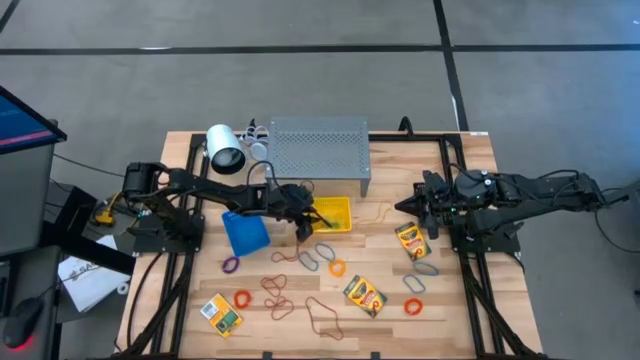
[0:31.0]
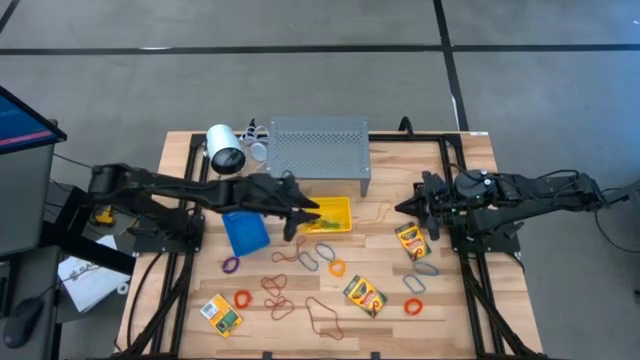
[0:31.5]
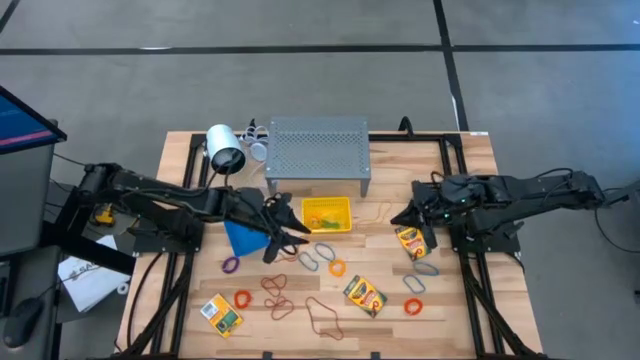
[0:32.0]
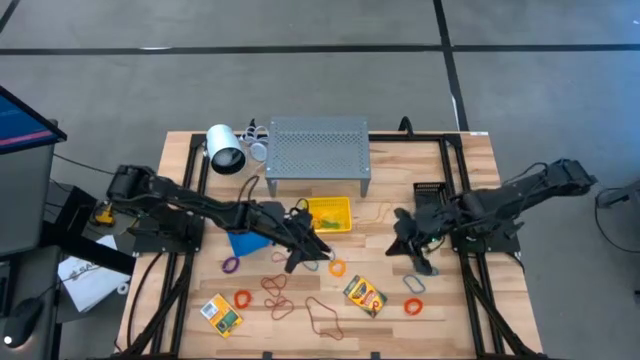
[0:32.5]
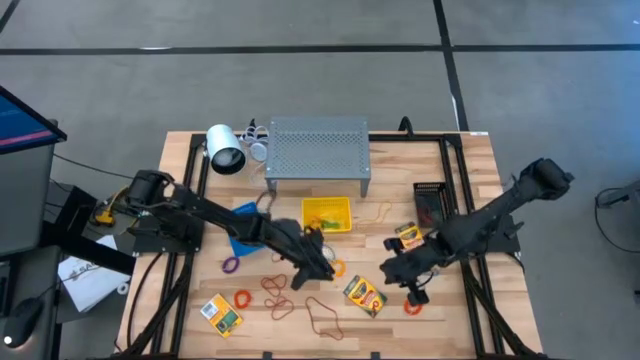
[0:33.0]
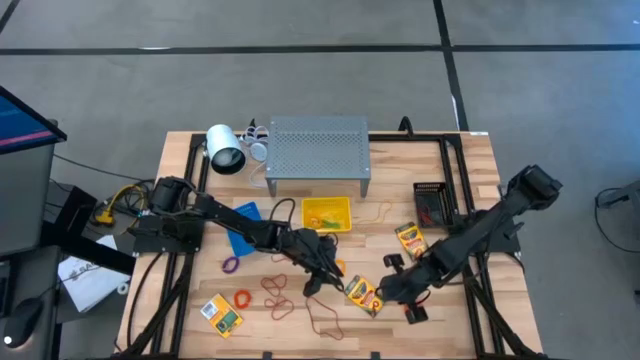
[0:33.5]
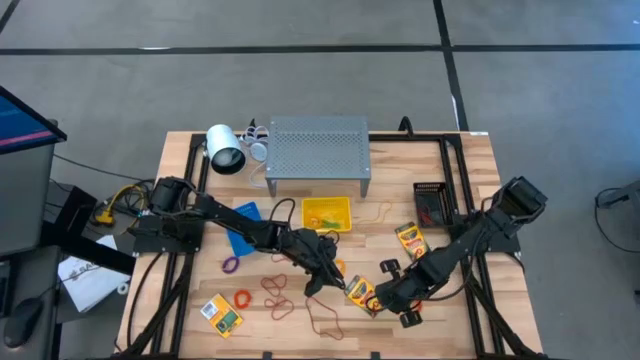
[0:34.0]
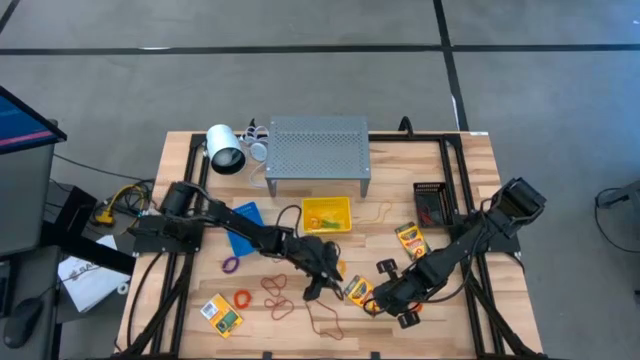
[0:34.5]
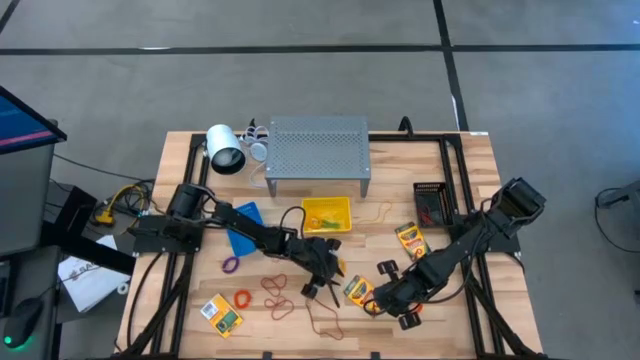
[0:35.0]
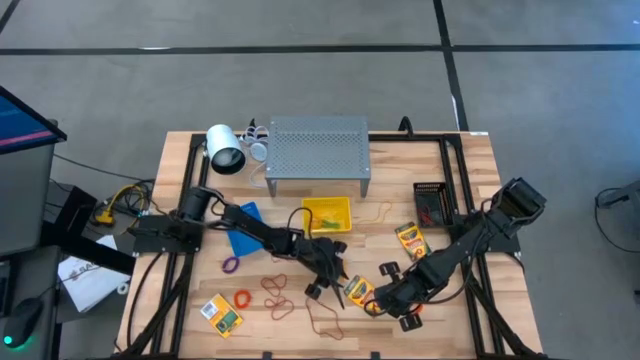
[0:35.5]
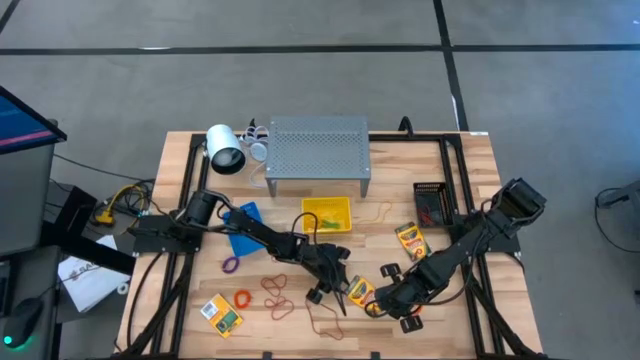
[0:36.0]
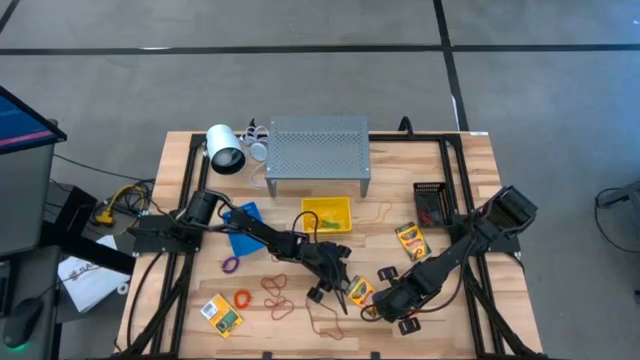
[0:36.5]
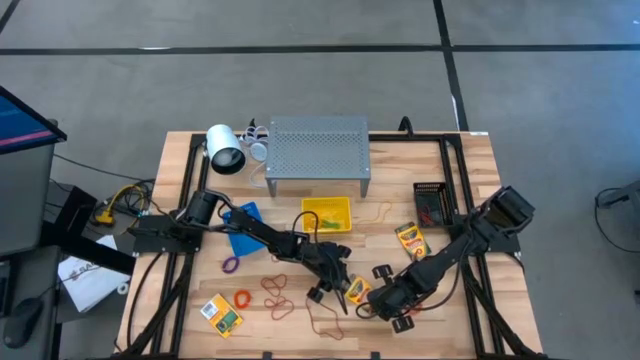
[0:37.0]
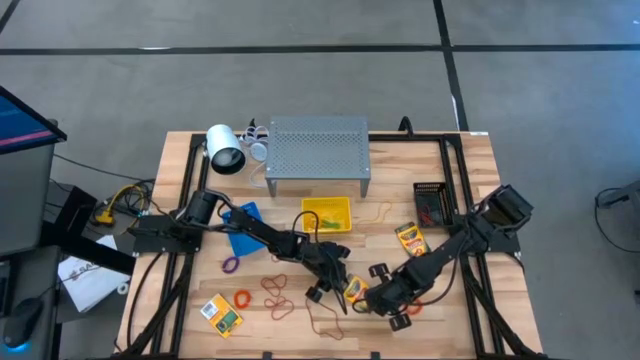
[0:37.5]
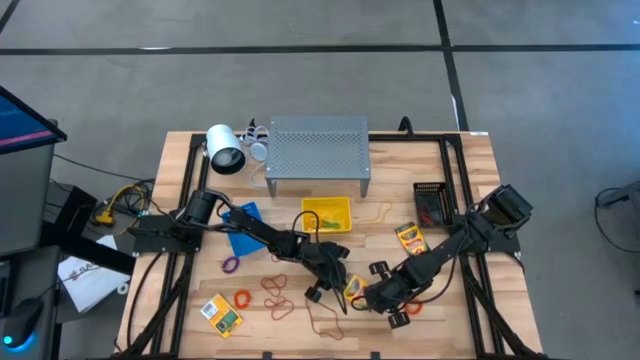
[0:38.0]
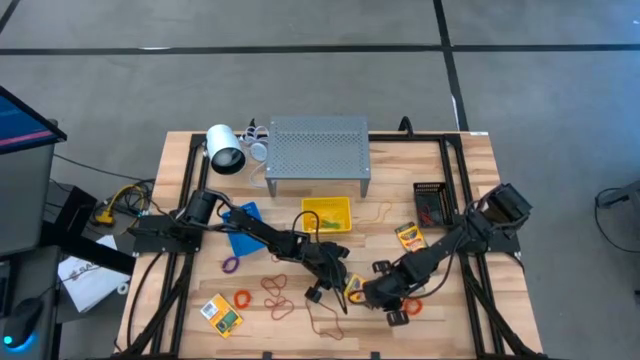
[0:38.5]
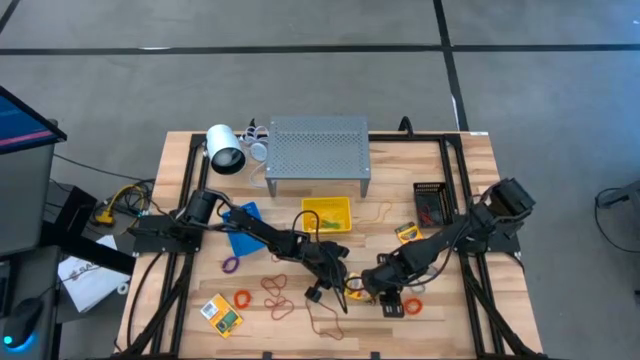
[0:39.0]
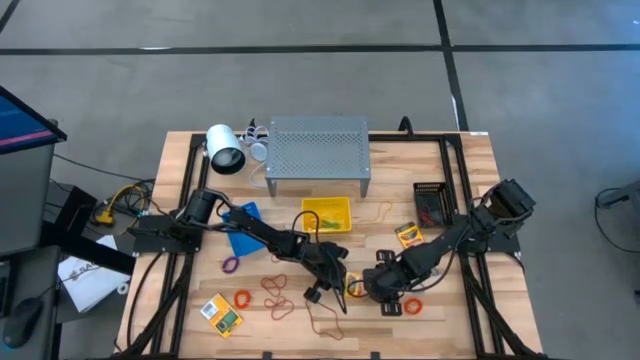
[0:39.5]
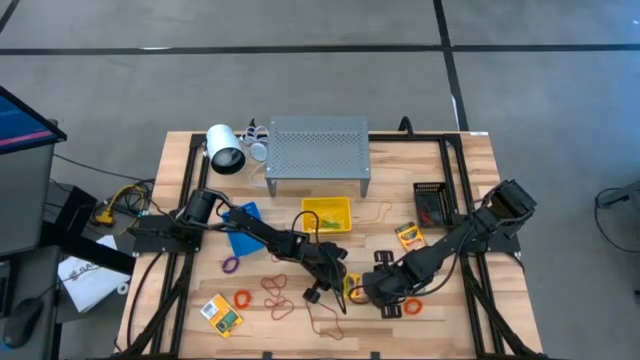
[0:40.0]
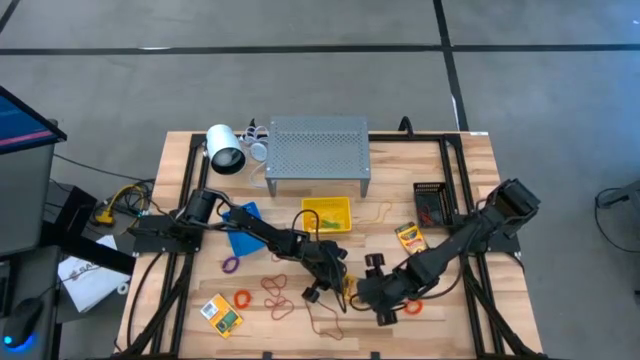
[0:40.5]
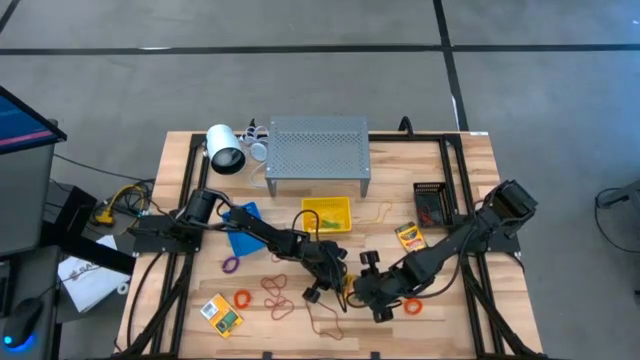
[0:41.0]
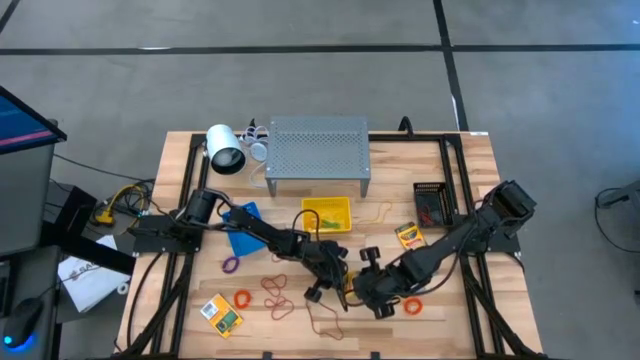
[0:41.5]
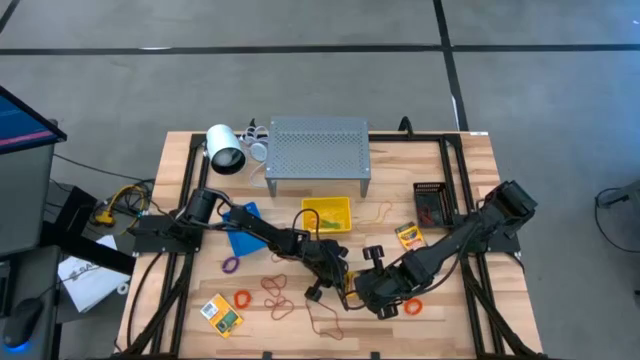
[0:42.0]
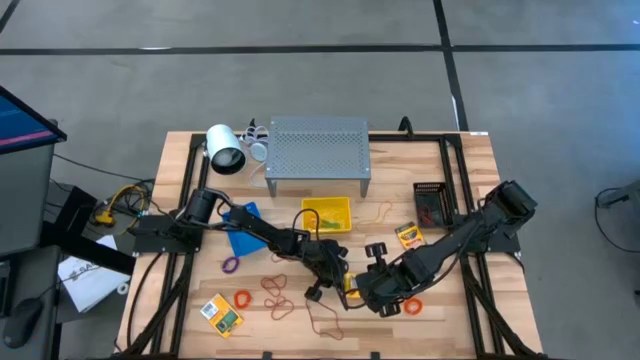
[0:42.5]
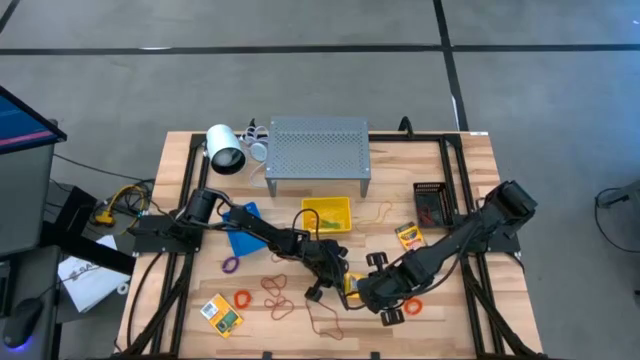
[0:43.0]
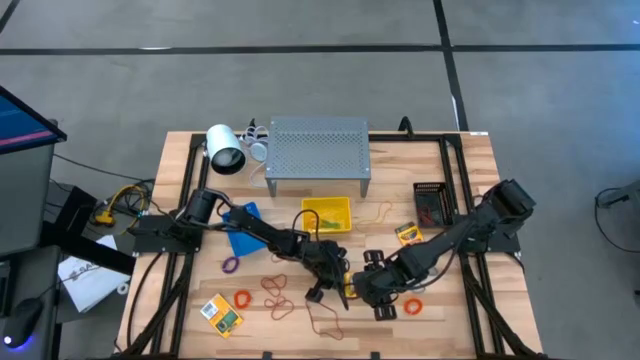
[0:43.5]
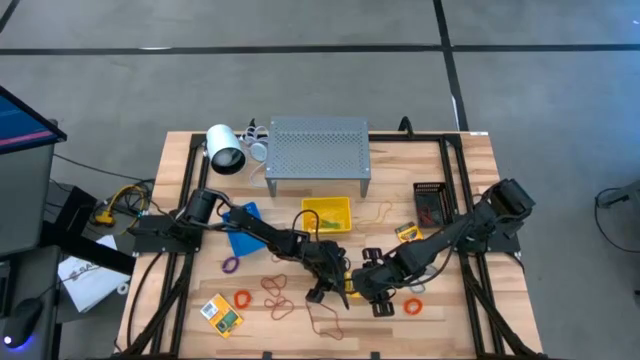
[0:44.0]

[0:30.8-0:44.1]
Task: Pick & Place Office Desk Supplies
Put the crayon box into the blue bin

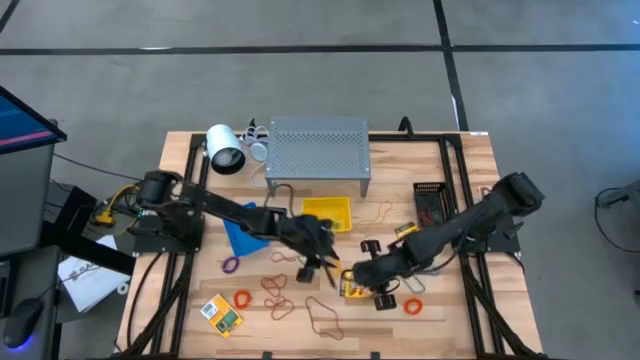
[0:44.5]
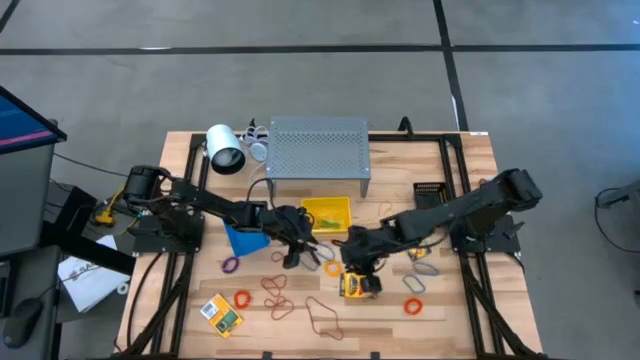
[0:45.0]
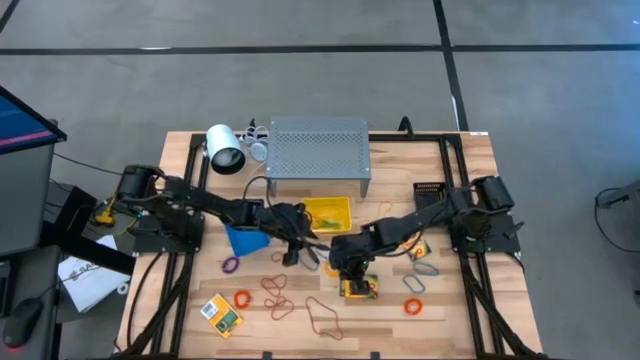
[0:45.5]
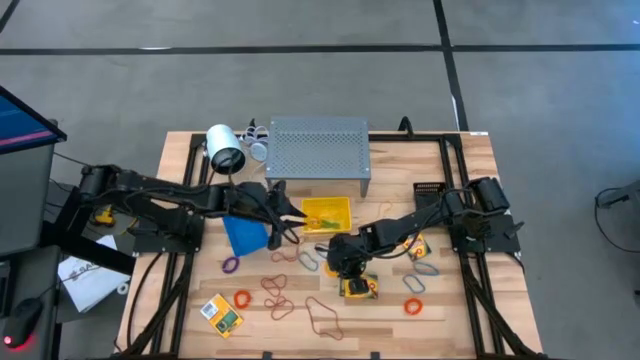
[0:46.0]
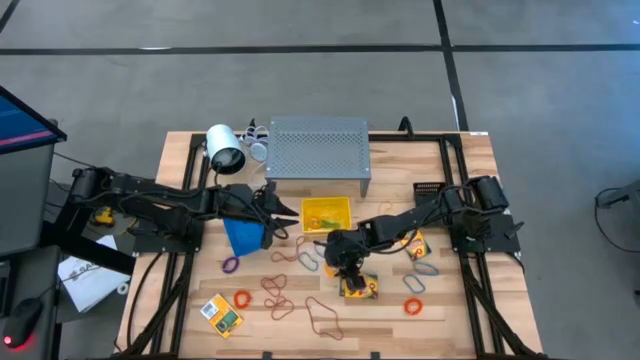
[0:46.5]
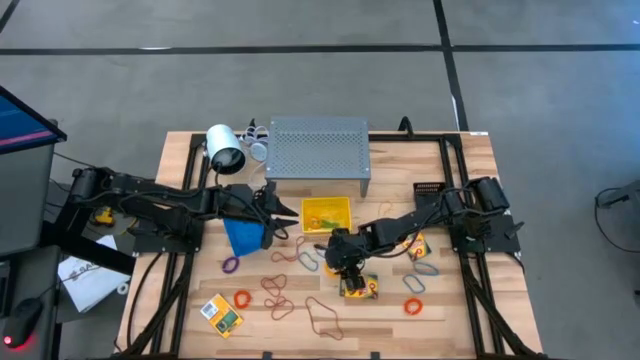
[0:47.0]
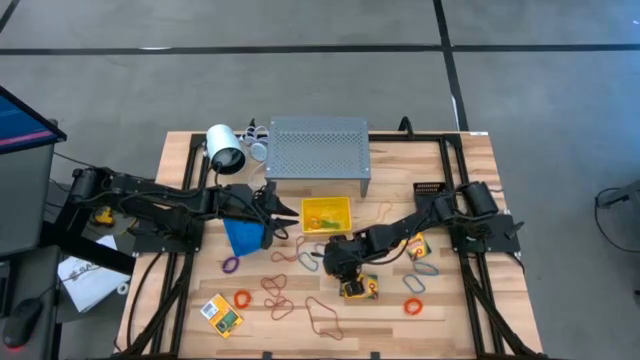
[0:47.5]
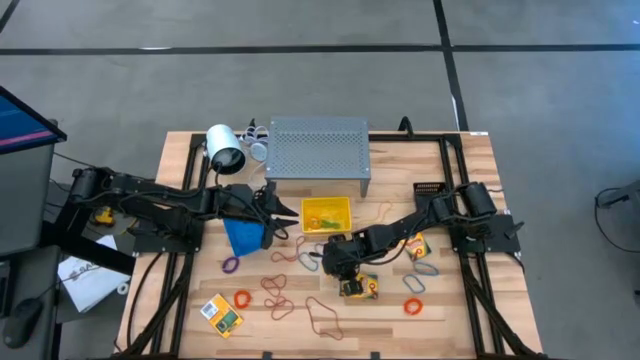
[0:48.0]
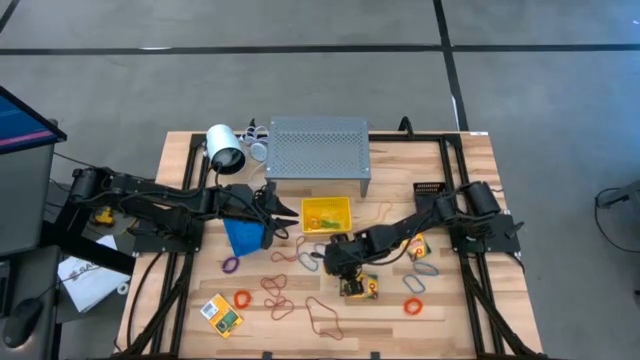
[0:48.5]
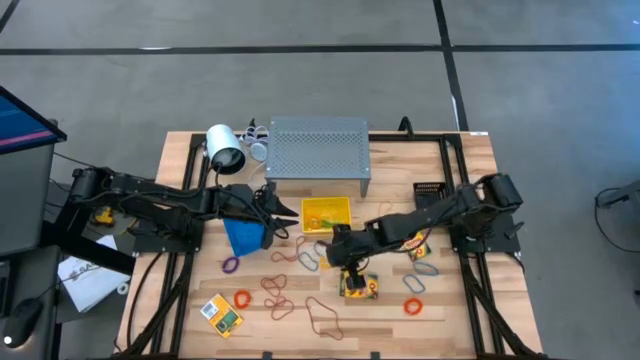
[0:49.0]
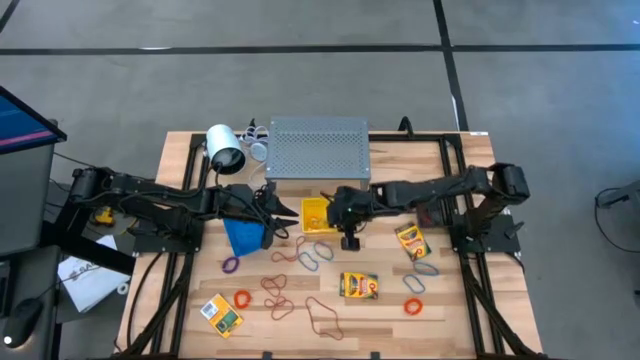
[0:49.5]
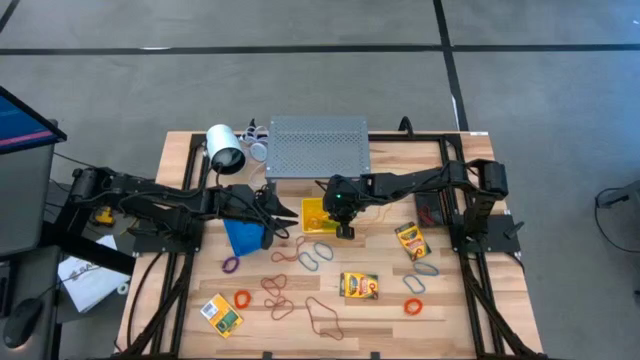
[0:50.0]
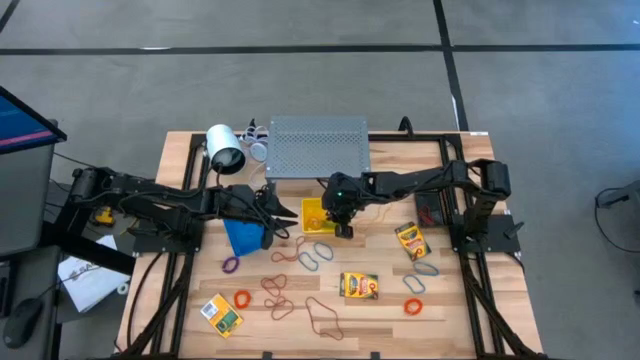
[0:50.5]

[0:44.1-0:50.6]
Put the yellow spring keychain into the yellow bin

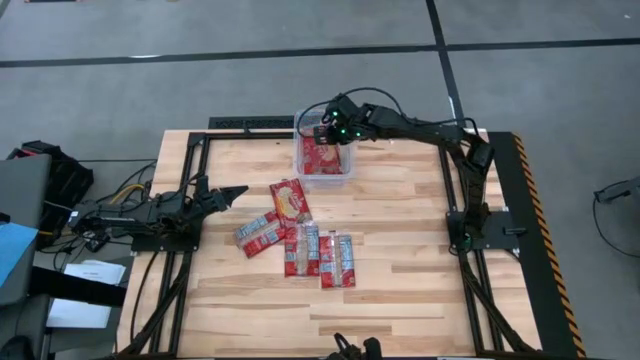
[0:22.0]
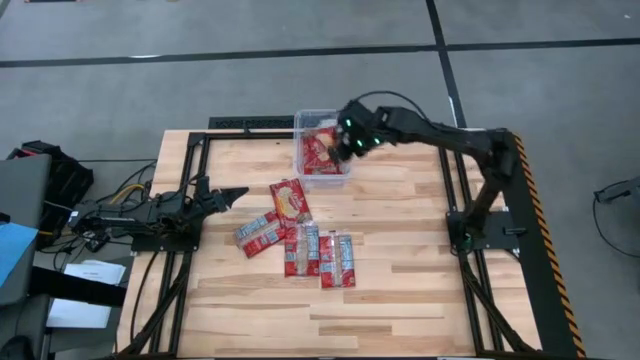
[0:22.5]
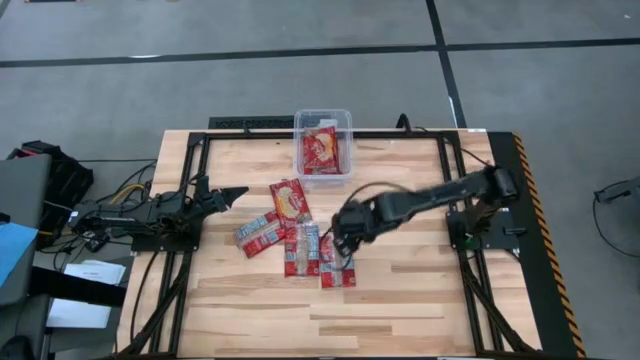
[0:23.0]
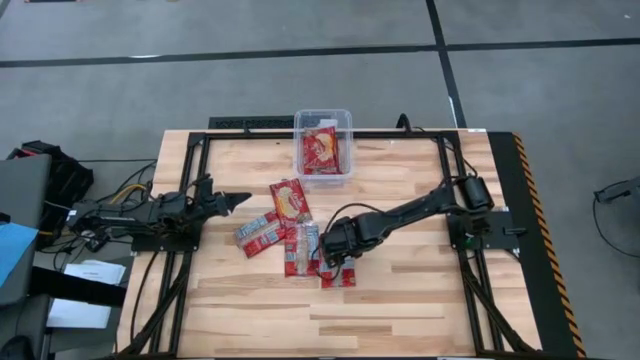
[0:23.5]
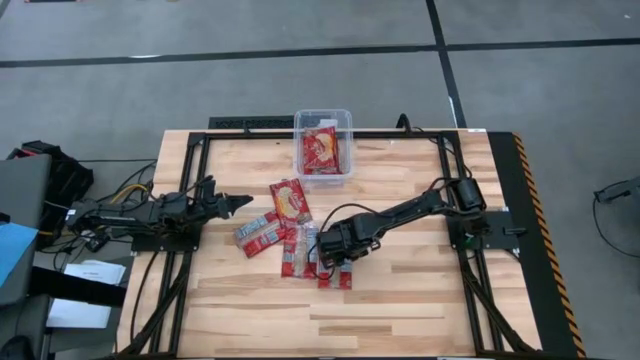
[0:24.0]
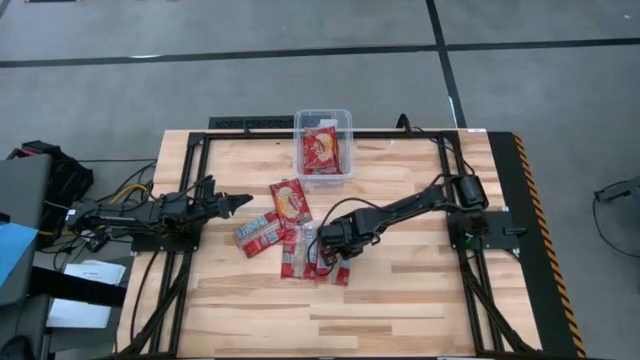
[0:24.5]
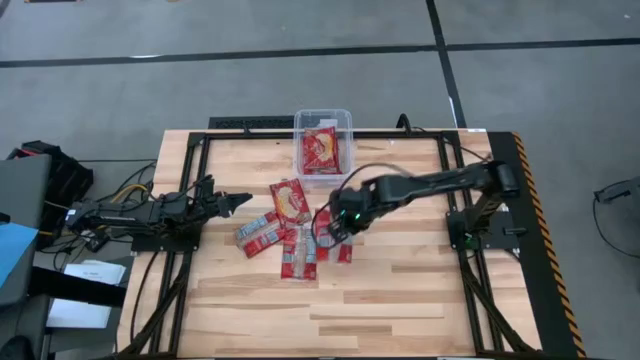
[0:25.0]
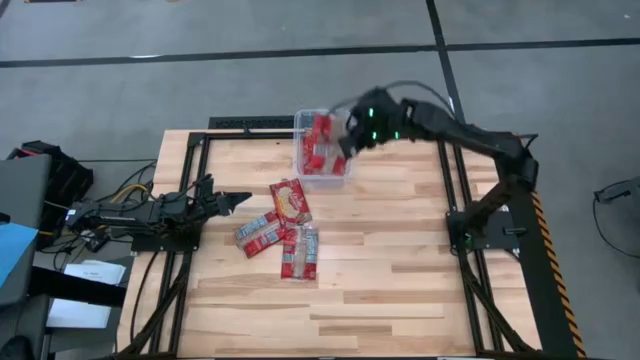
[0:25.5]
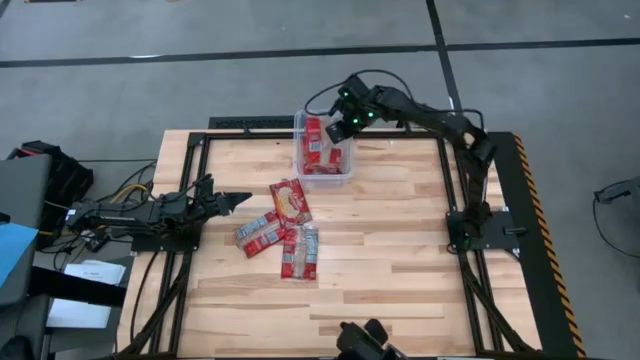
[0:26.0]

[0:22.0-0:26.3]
Task: Sort popcorn bags into baskets
Put the red popcorn bag into the transparent bin
